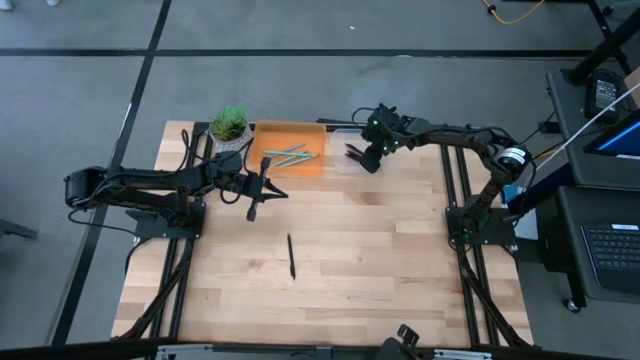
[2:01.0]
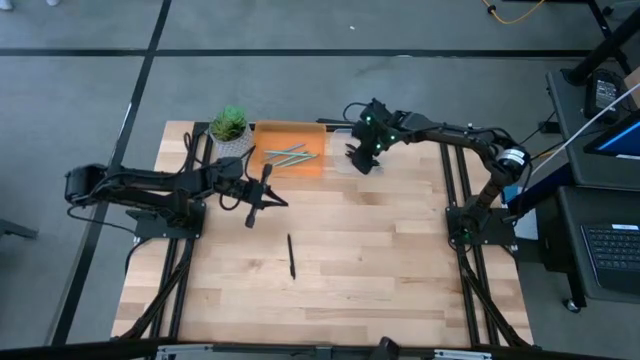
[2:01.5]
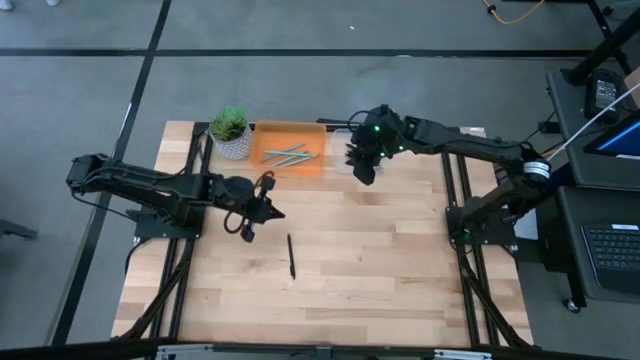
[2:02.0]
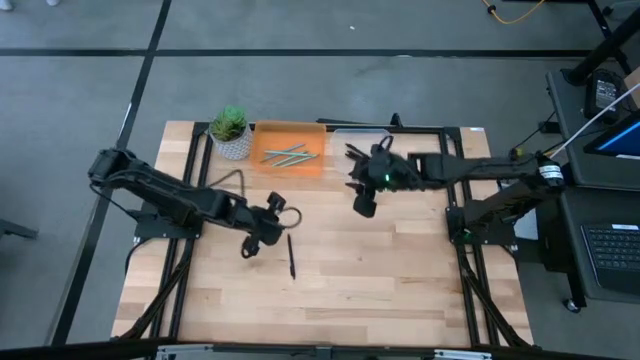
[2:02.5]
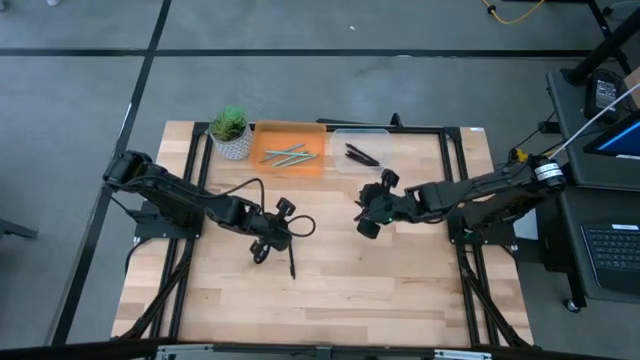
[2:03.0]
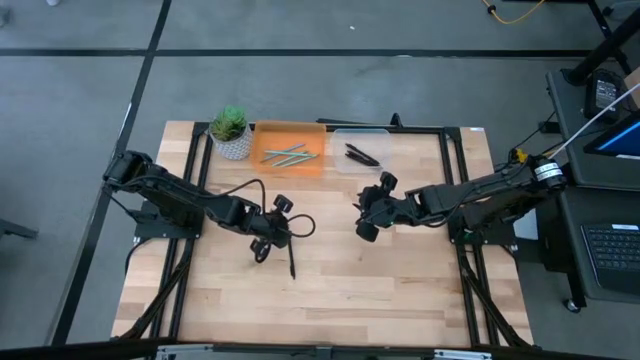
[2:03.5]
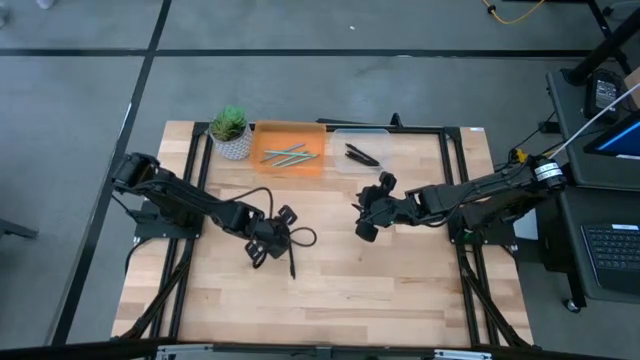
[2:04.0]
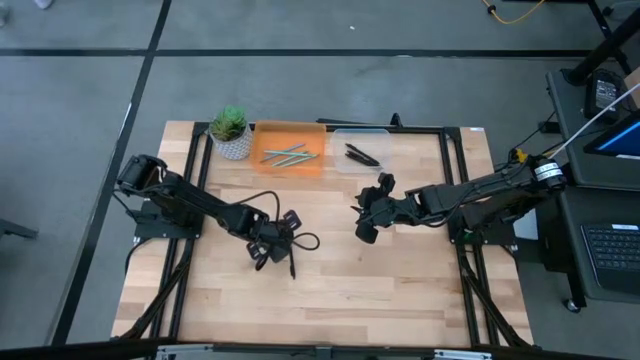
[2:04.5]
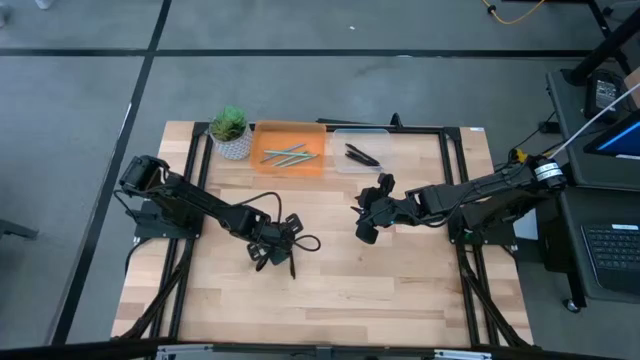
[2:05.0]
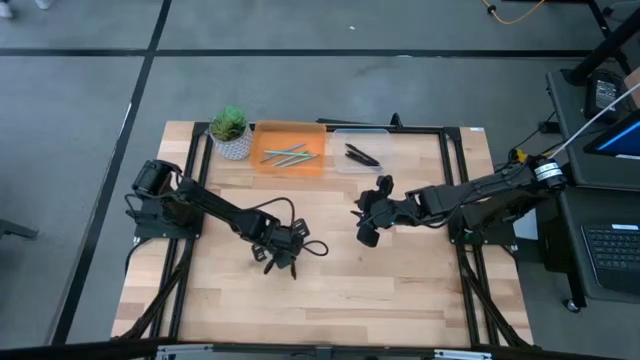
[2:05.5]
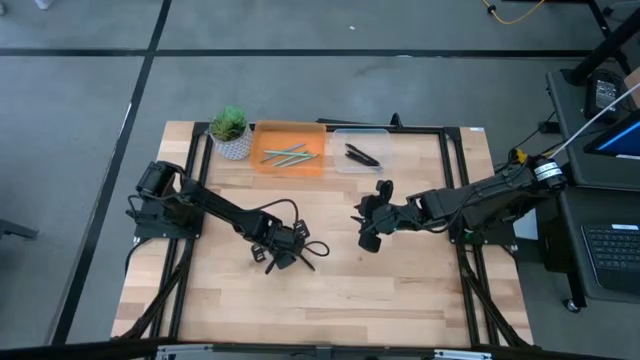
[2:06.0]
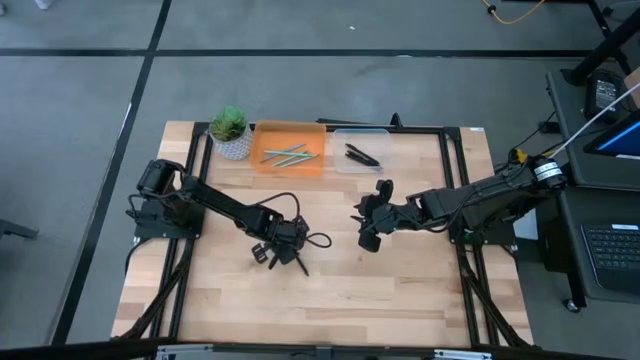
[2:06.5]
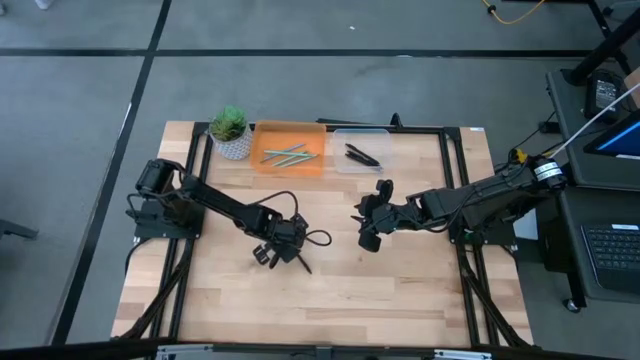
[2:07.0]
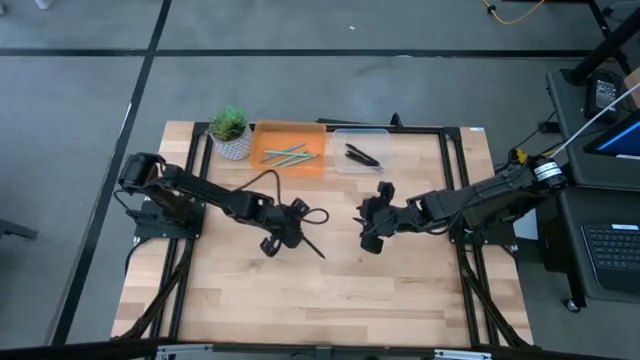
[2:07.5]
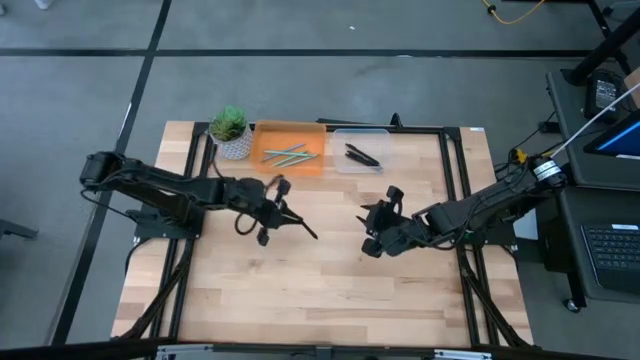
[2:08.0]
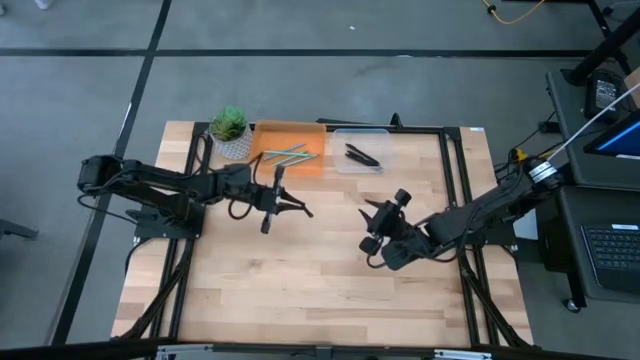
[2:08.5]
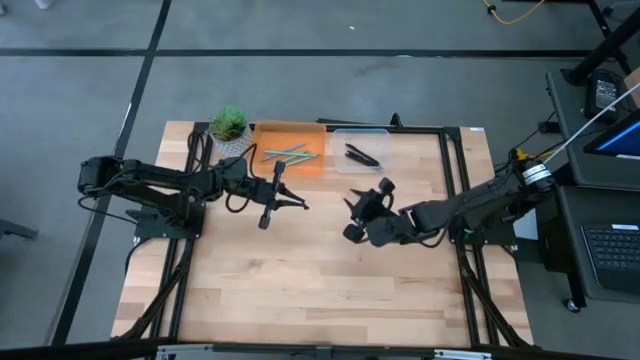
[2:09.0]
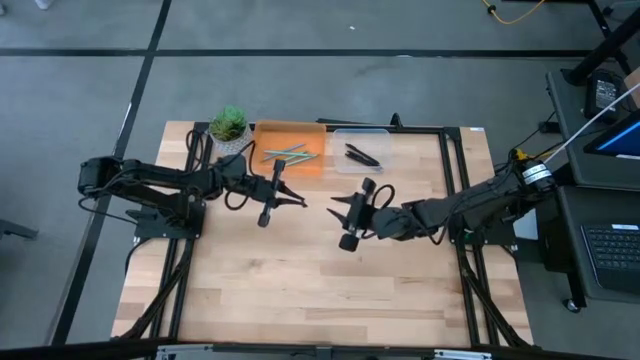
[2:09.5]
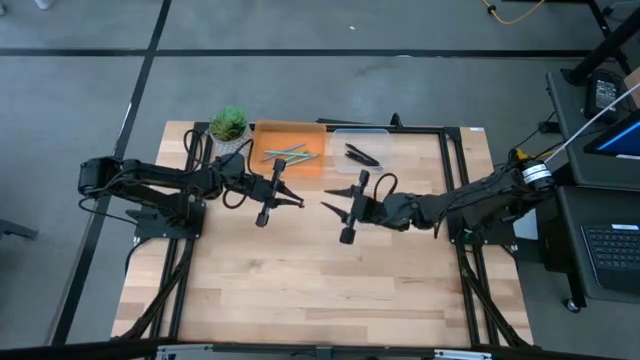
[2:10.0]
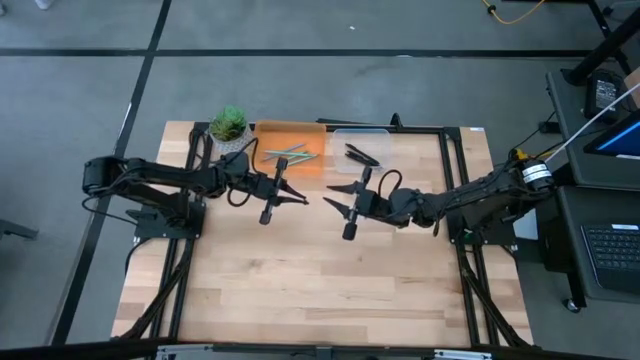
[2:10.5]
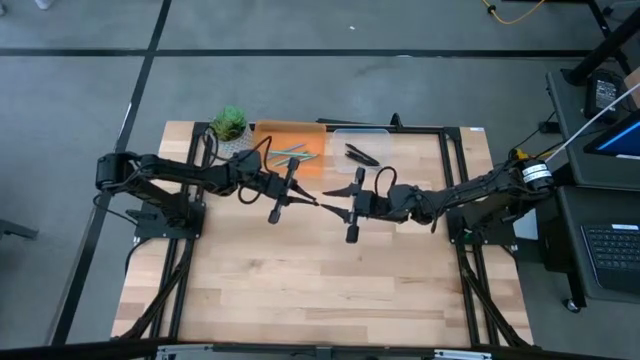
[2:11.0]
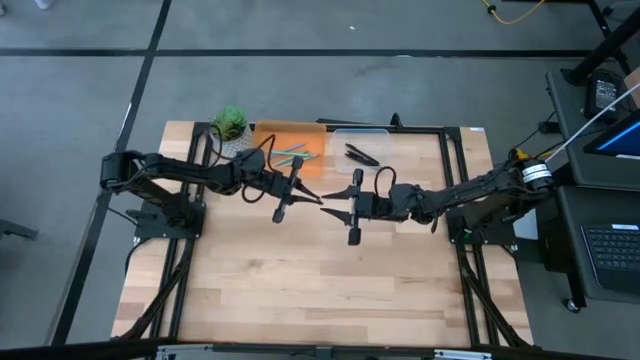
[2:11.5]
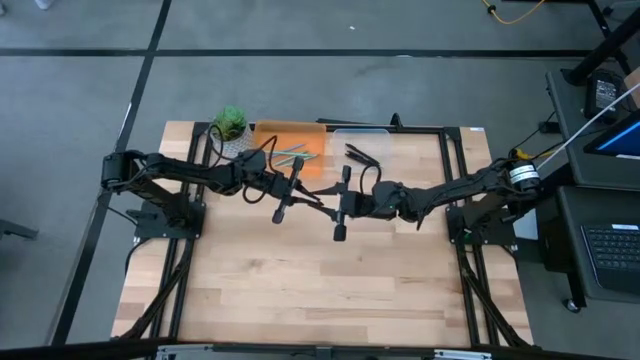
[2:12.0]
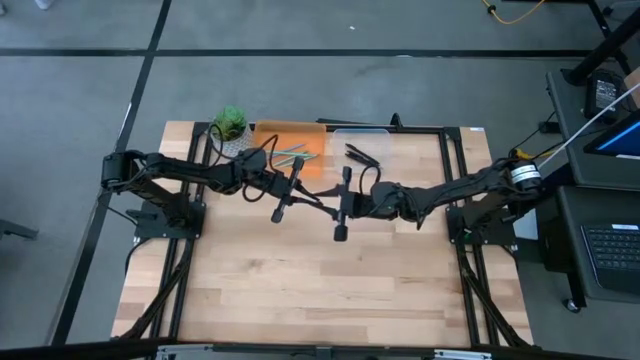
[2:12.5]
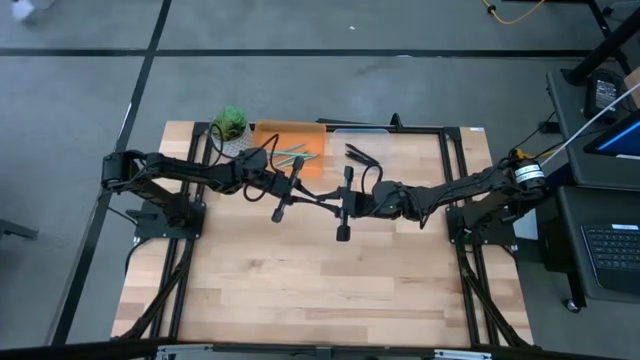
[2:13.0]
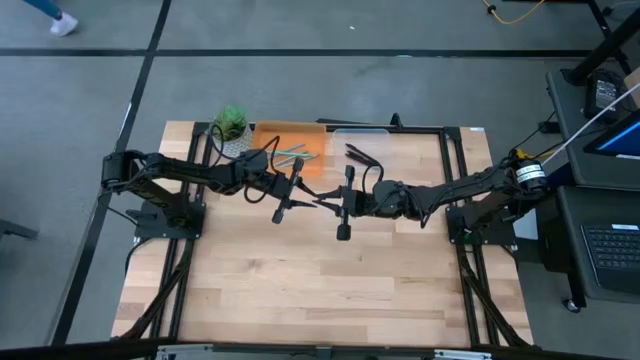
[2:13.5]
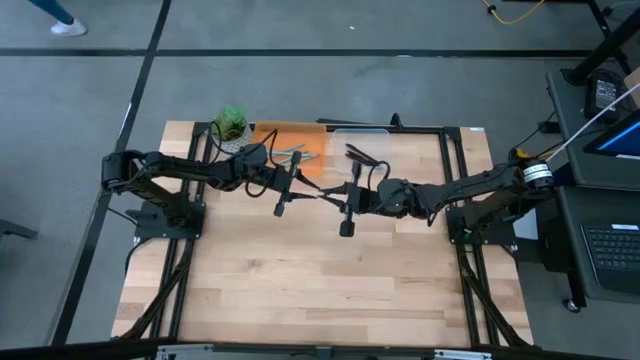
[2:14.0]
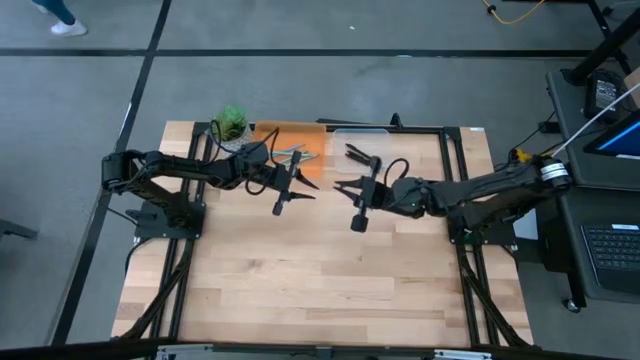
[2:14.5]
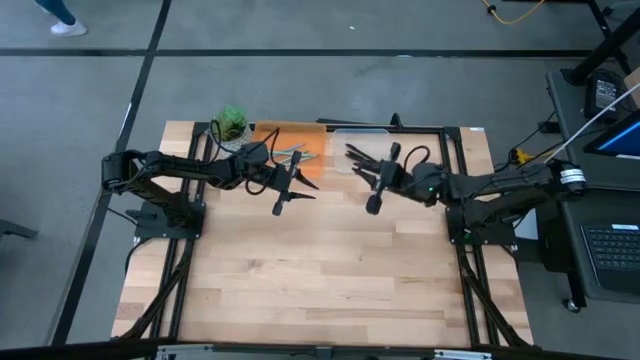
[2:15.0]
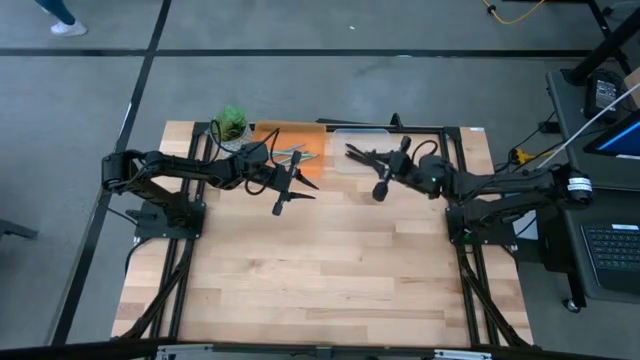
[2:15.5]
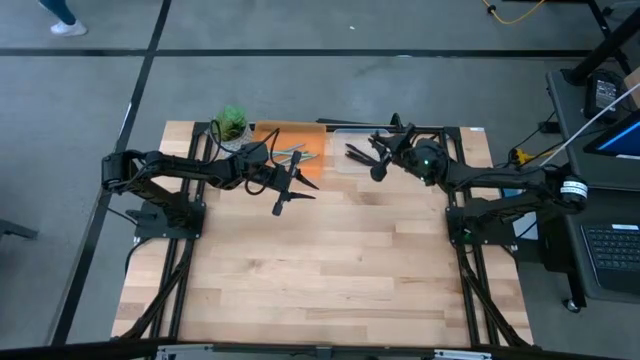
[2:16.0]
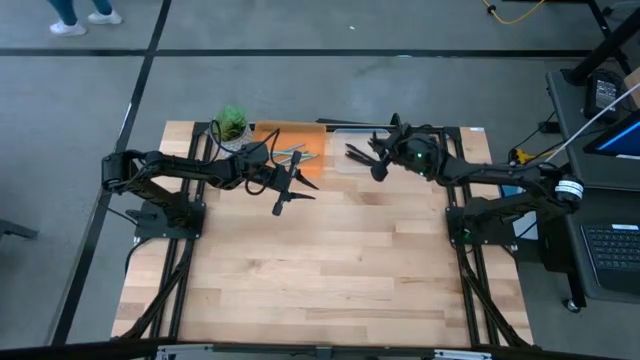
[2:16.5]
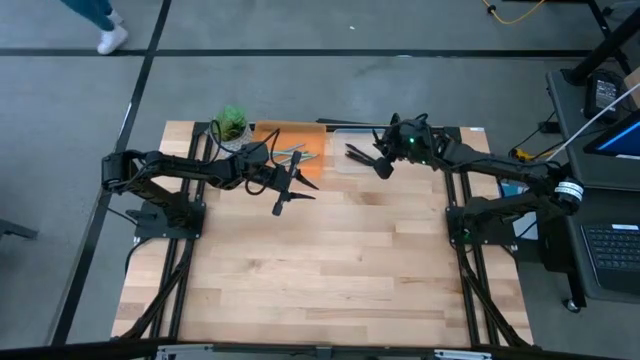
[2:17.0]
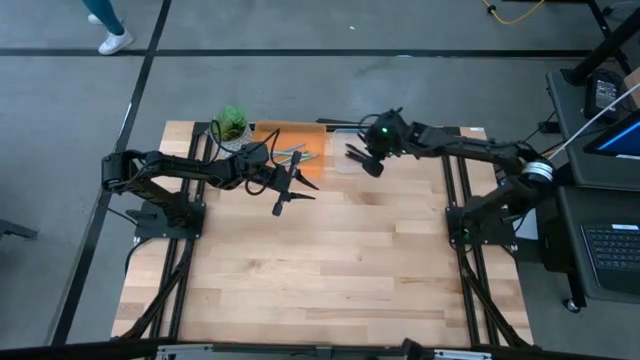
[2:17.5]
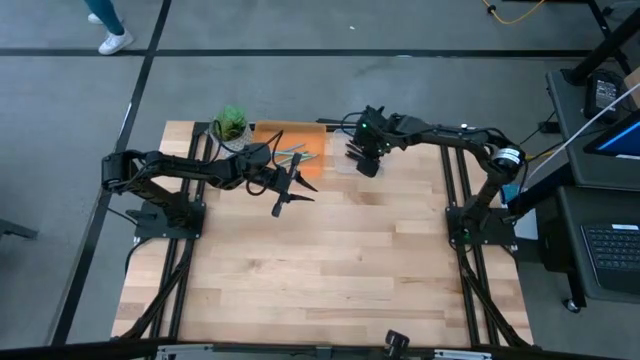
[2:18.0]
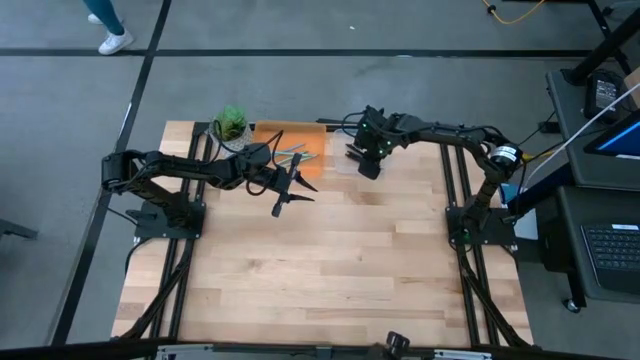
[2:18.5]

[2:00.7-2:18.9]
Task: Sort pens & pencils
Put the black pen into the transparent bin

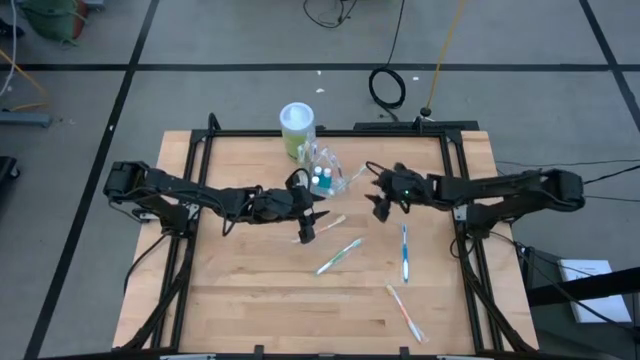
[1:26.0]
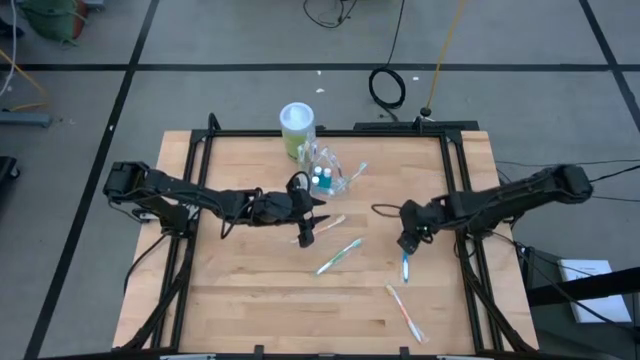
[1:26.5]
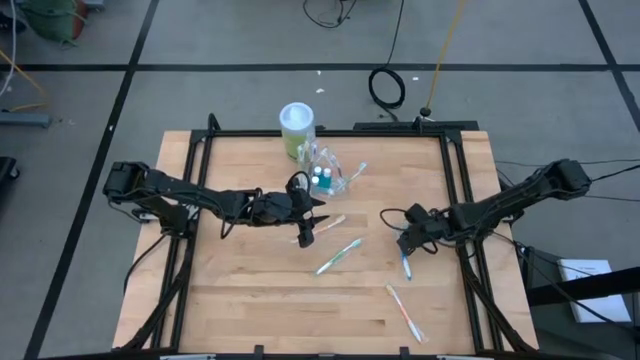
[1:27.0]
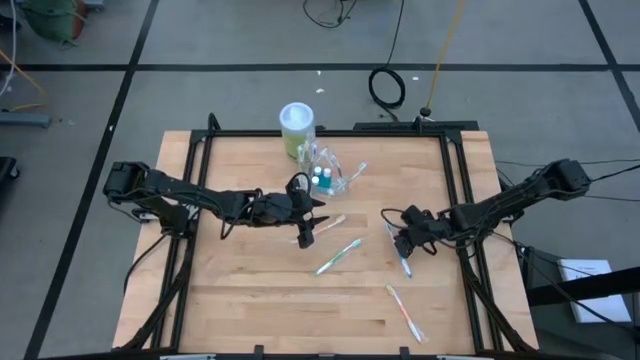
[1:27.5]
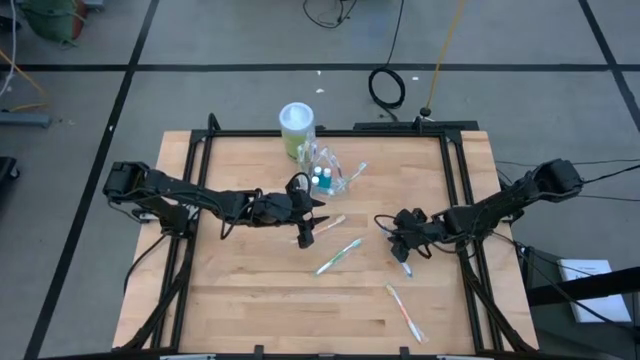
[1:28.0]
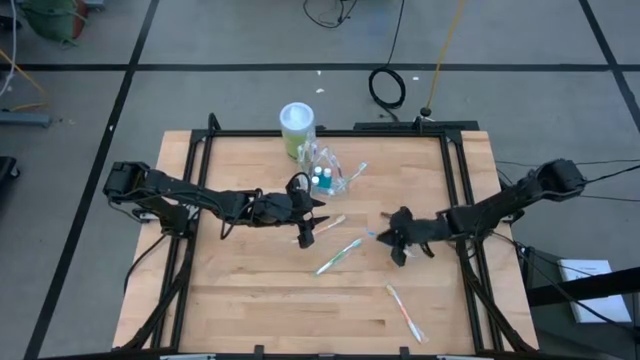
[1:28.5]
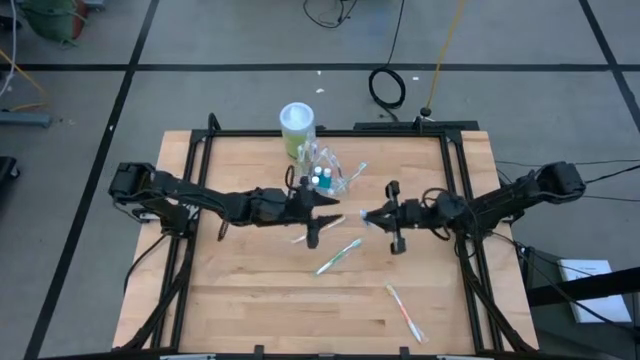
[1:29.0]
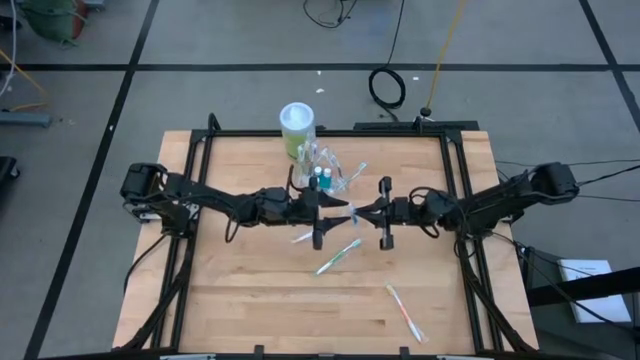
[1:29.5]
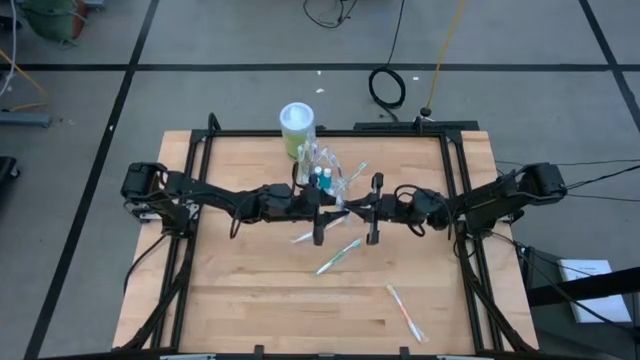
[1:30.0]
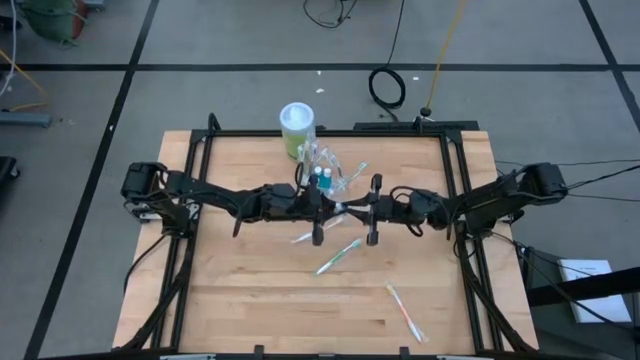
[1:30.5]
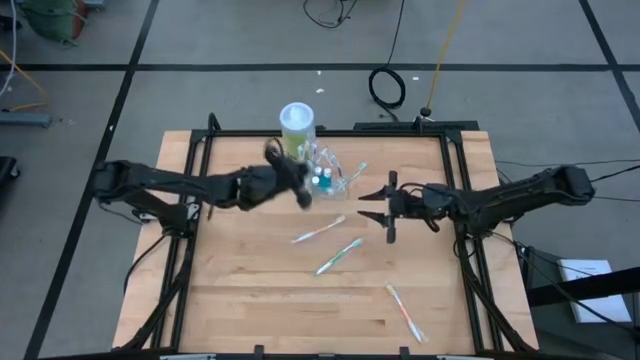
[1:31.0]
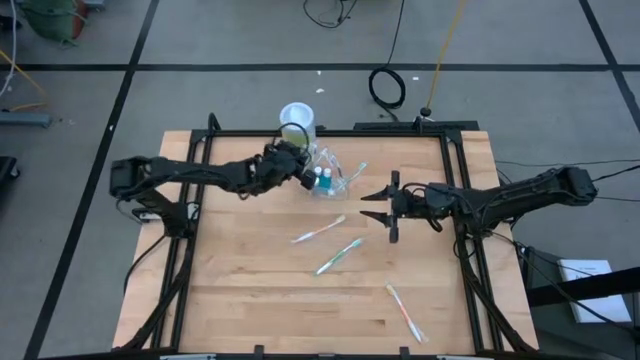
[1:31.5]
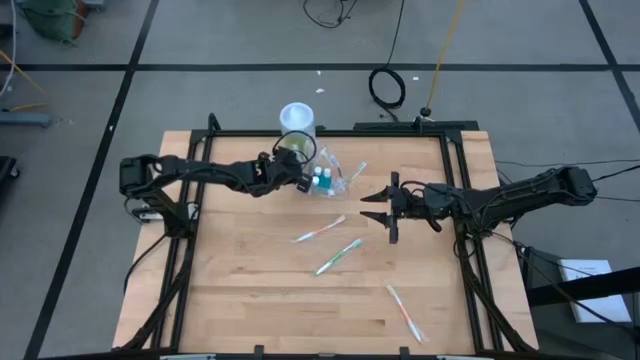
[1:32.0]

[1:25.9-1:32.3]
Task: Pick & Place toothbrushing station
Put the blue toothbrush into the left of the transparent organizer
